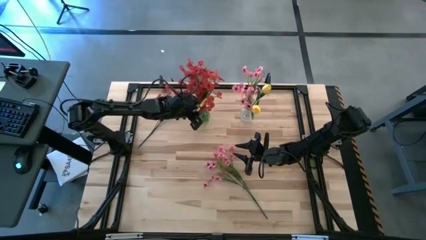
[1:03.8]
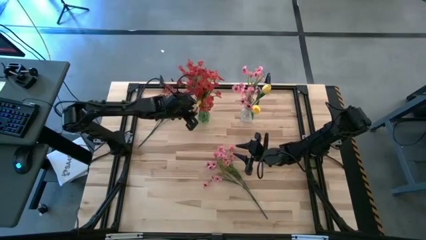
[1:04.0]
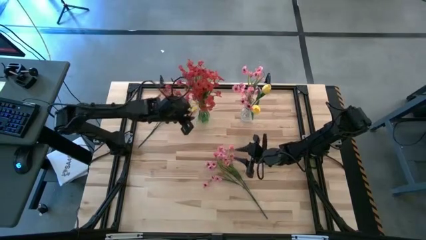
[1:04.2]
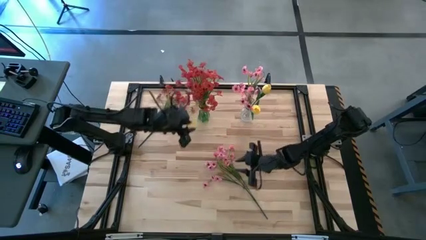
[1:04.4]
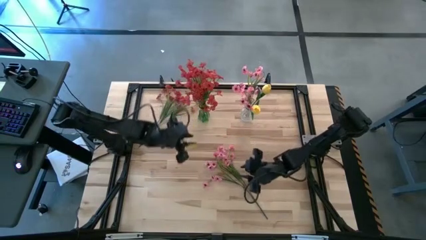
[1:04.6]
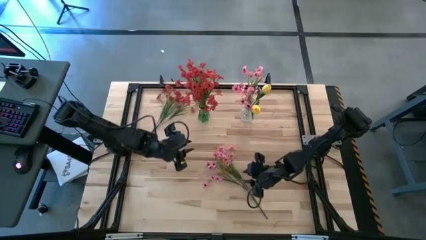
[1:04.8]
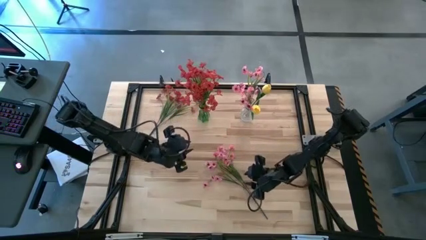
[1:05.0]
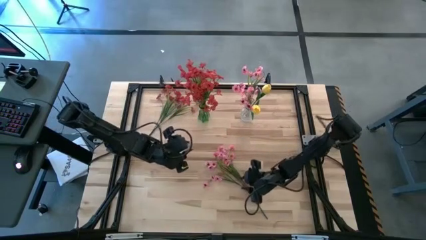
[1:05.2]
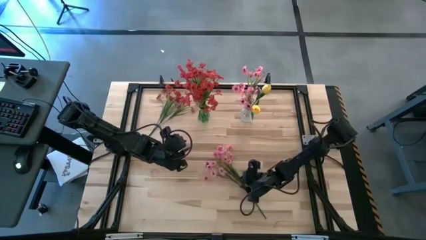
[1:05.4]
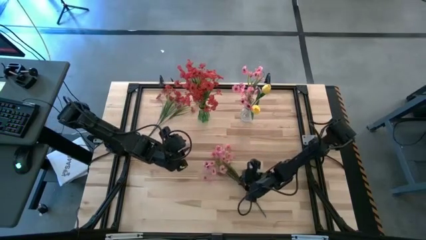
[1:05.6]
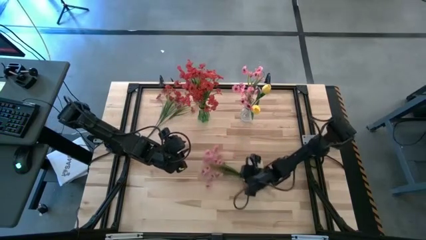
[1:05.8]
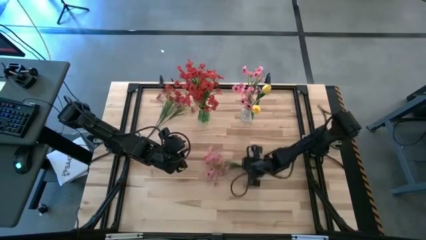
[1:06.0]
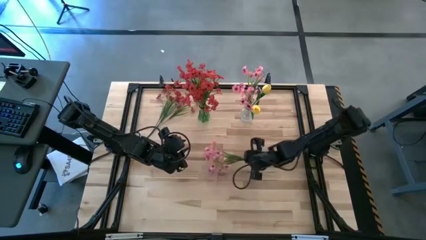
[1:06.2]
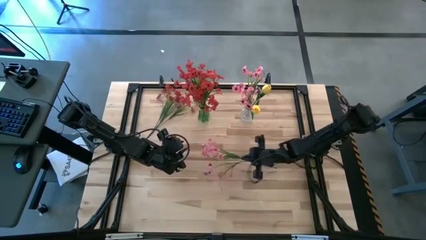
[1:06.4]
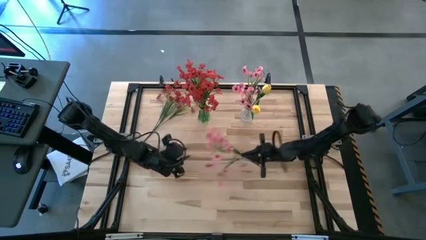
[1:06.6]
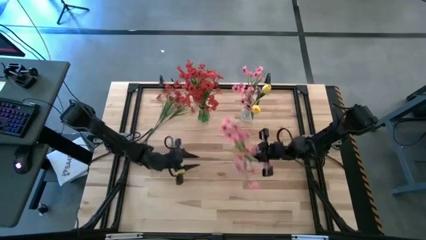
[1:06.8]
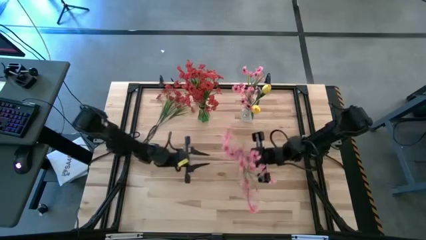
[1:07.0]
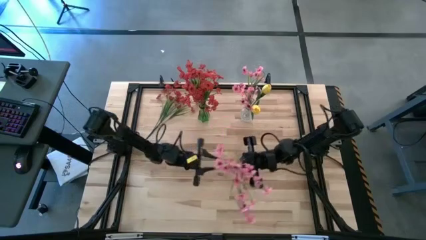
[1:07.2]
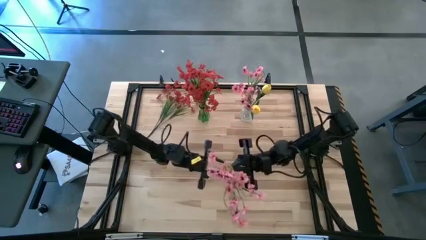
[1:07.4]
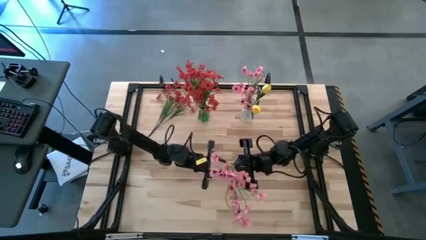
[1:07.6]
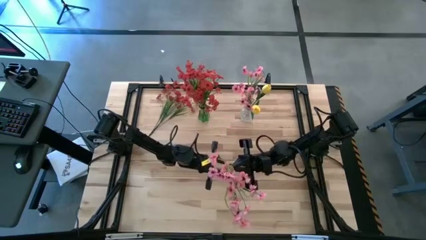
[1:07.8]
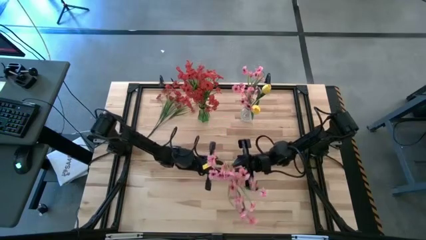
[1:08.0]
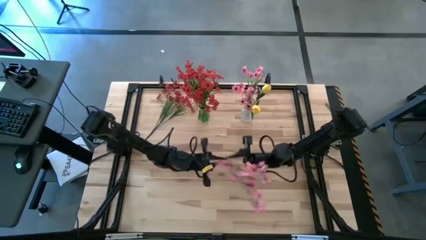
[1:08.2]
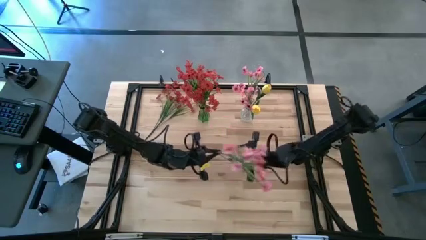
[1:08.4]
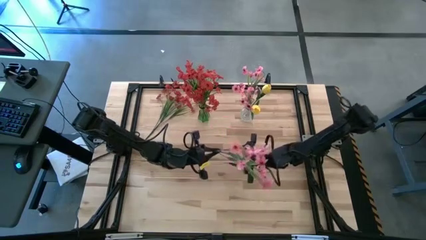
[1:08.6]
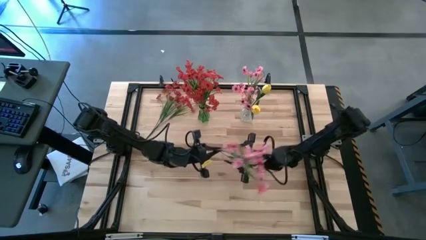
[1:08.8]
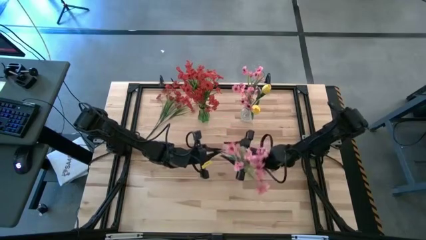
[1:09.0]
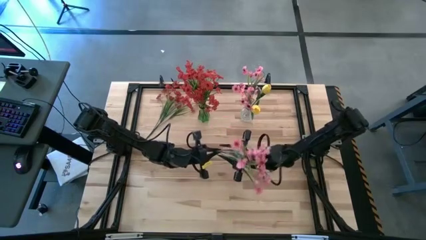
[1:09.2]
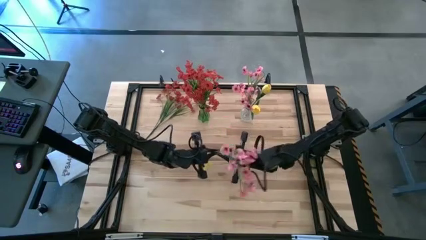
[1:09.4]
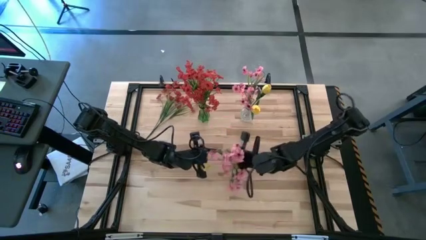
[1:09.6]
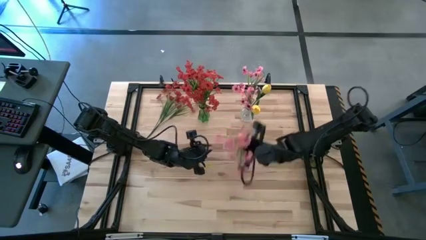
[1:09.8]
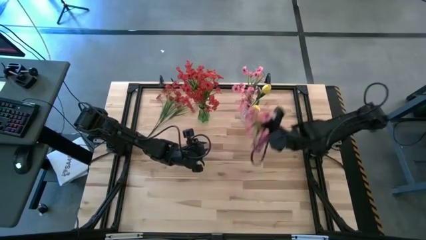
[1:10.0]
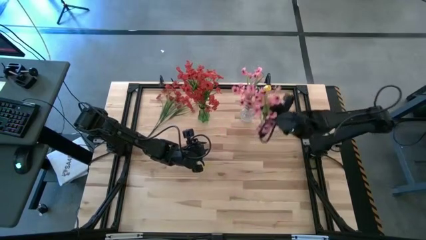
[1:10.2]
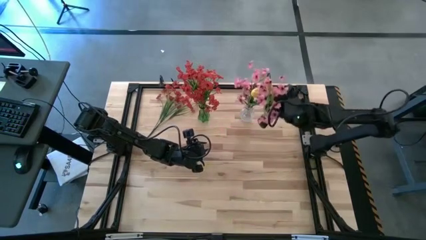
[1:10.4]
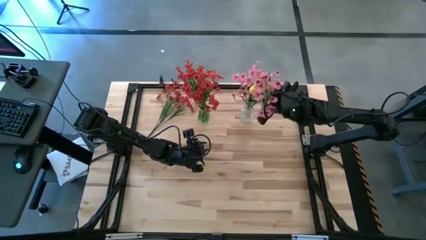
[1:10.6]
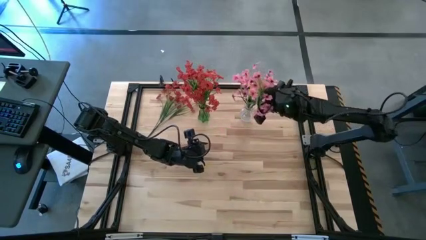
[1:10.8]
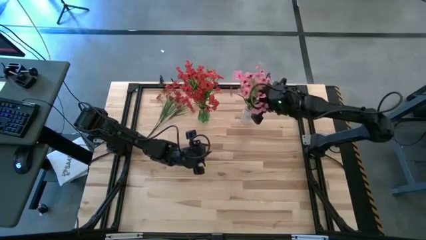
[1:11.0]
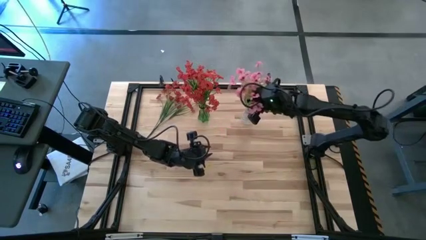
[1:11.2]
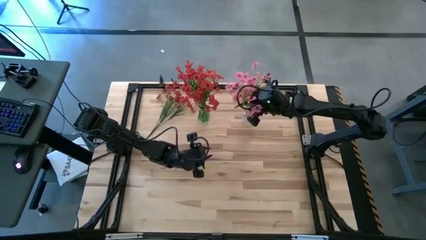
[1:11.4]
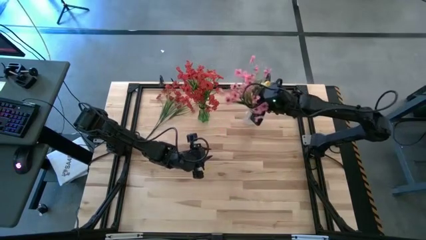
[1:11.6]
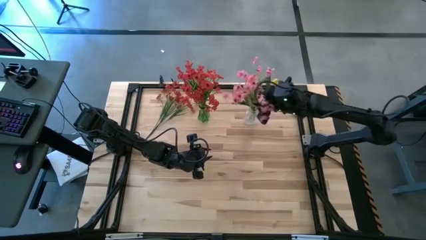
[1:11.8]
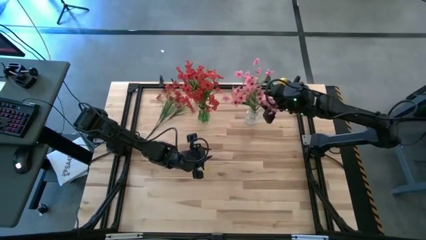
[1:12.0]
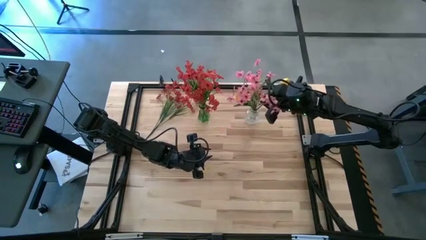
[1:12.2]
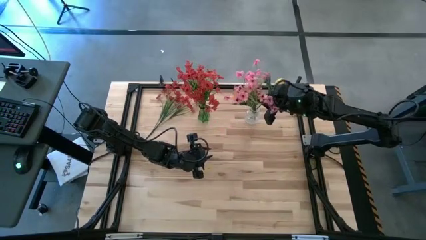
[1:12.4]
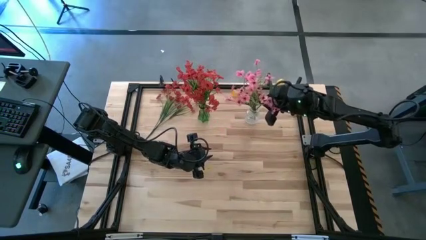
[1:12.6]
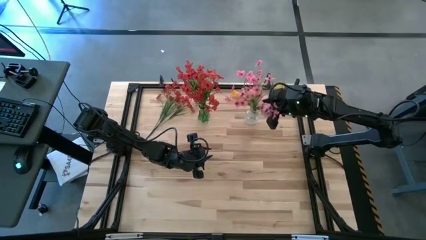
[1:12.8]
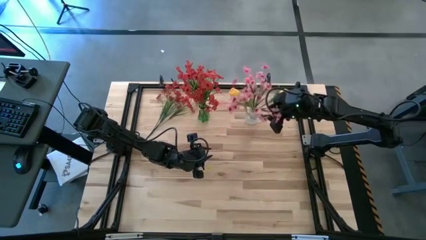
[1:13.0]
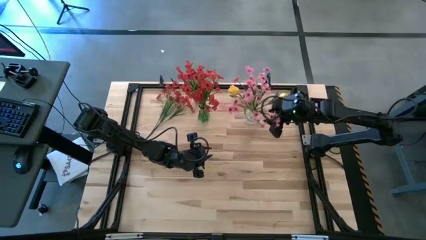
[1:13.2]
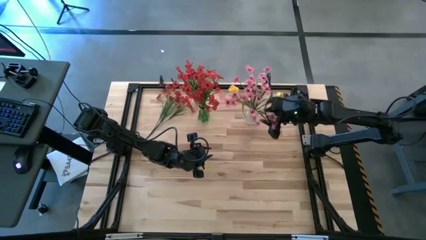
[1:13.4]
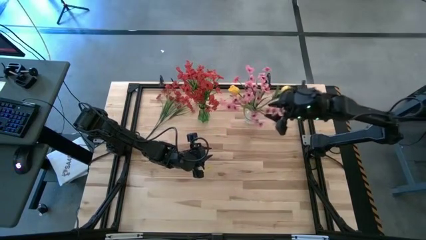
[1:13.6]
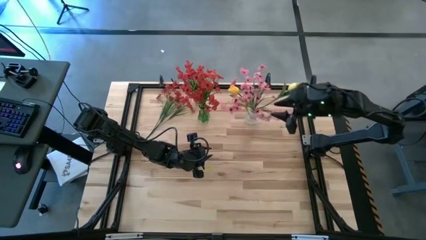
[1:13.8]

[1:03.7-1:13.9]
Task: Sort flowers into vase by color
Put the pink flower into the transparent vase

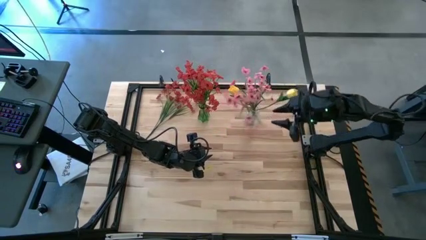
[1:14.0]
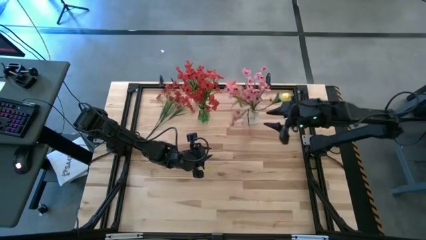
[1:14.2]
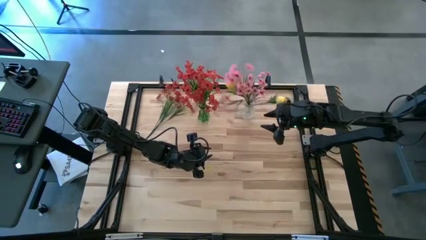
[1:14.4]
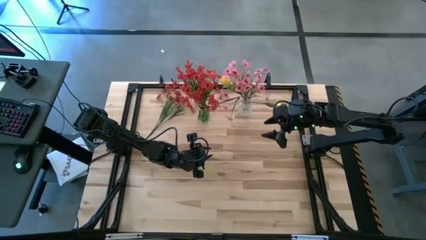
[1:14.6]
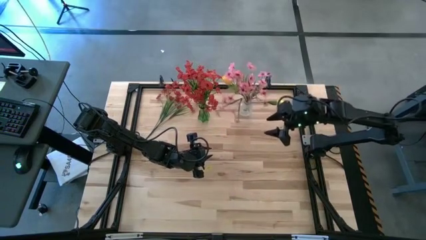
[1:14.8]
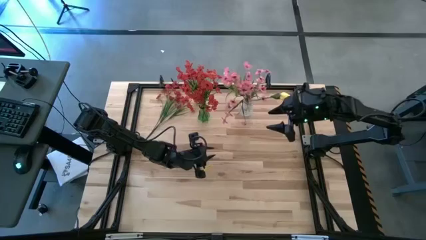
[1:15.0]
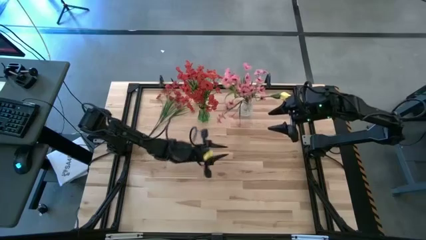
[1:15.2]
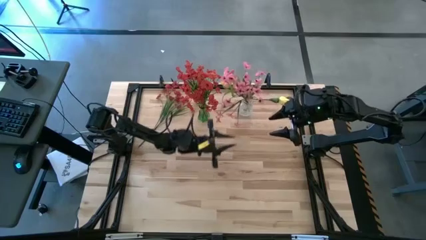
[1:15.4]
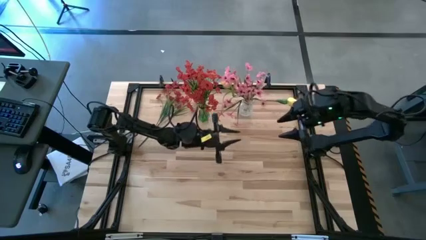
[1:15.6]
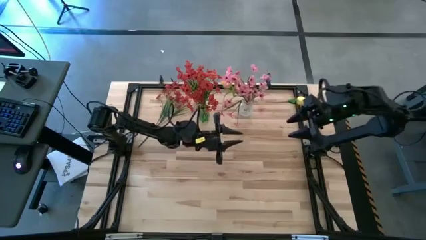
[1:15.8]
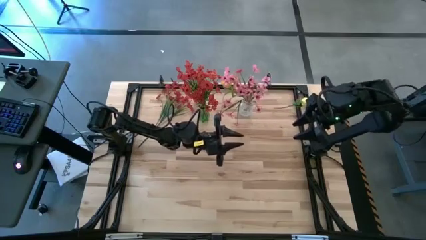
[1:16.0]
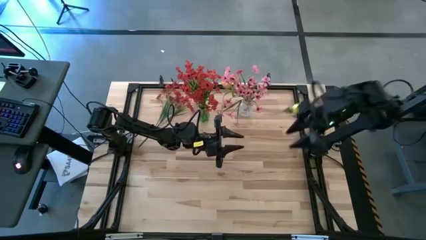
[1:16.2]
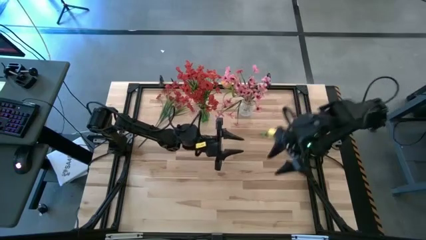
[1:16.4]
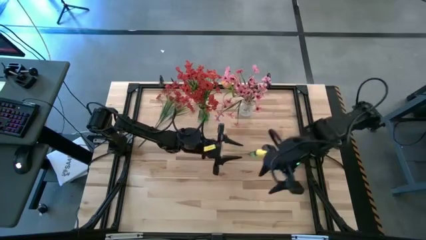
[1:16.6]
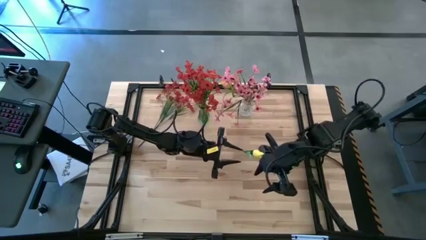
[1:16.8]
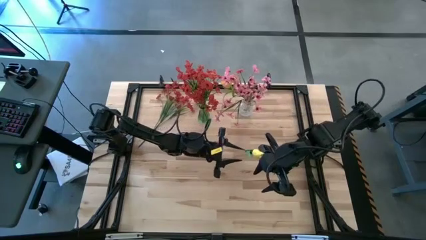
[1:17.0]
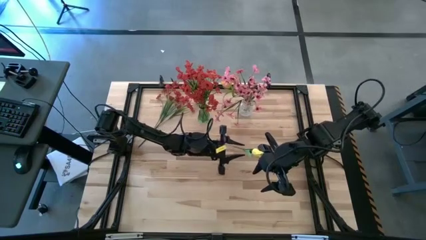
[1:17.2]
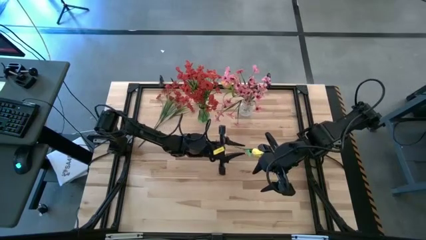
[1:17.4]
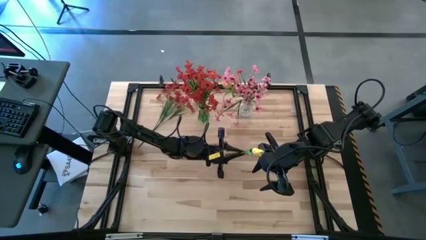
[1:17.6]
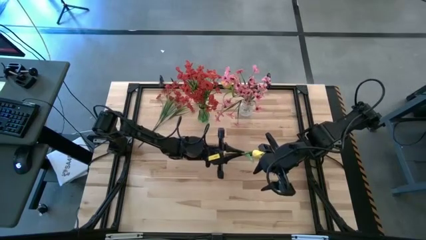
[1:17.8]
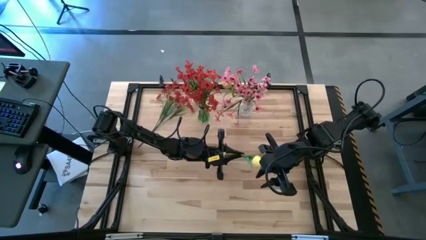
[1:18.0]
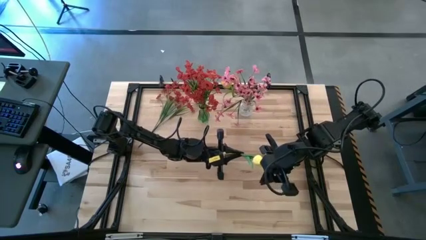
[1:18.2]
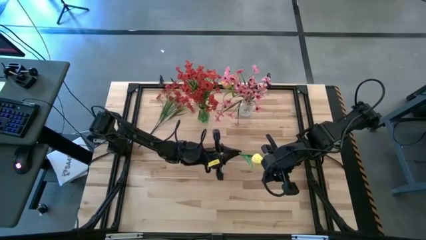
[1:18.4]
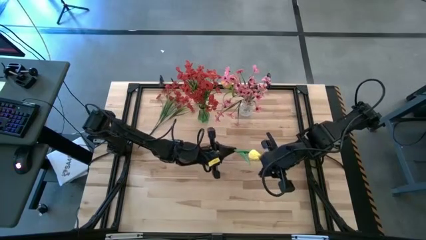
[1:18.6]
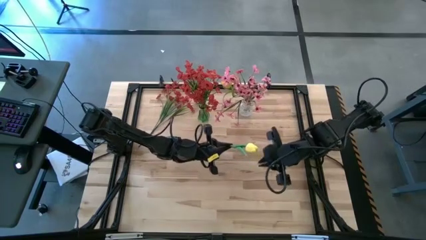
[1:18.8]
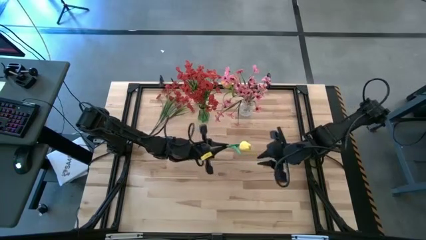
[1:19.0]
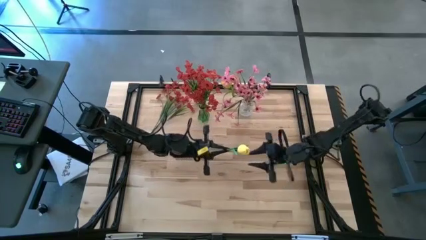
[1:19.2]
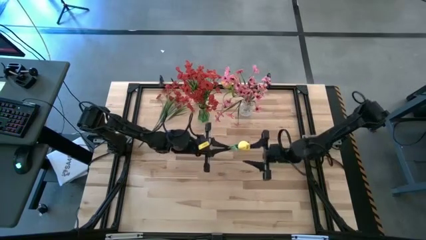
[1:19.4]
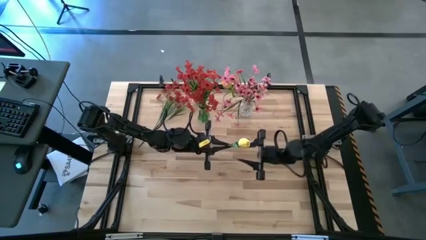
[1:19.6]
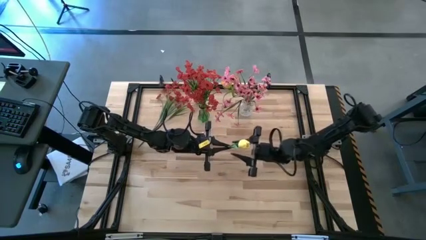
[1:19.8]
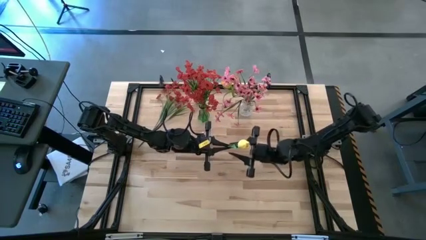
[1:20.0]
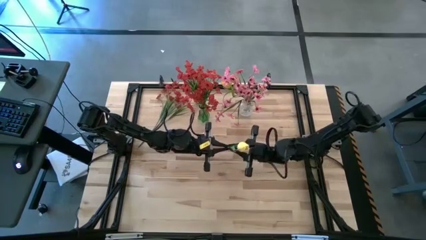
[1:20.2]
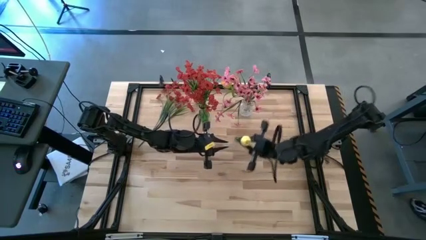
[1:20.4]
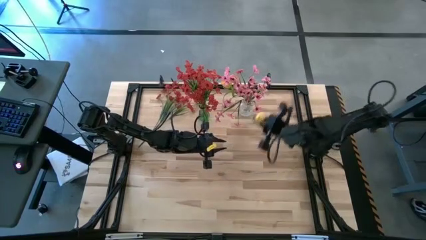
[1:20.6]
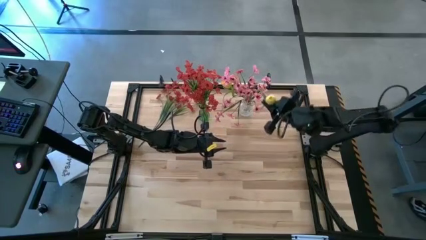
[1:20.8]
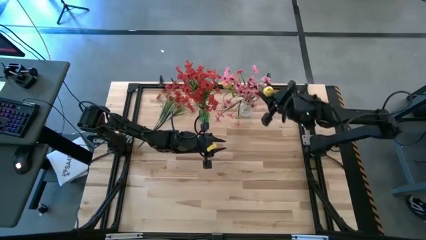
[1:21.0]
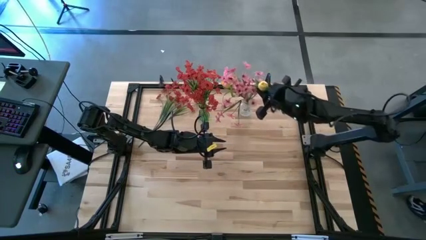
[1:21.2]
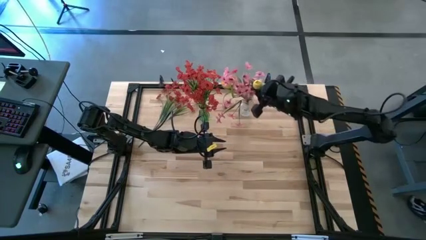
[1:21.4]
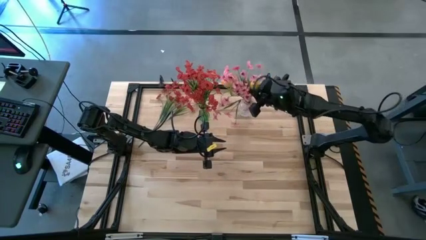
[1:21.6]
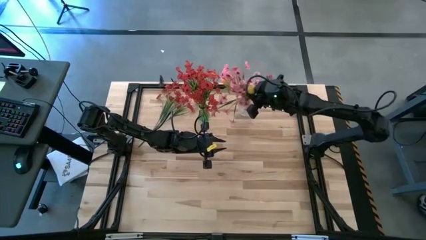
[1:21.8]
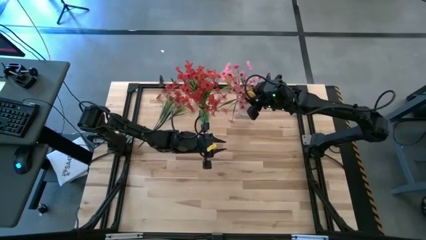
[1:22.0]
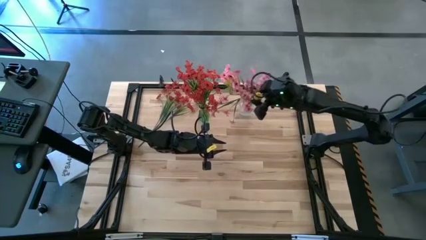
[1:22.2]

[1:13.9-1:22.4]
Put the yellow flower into the transparent vase
